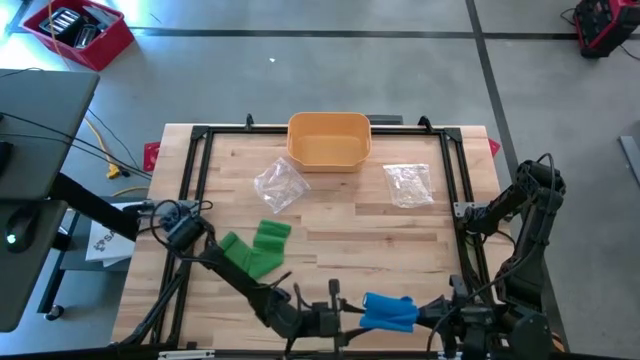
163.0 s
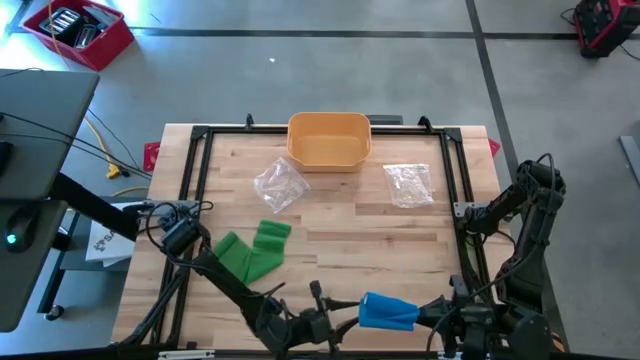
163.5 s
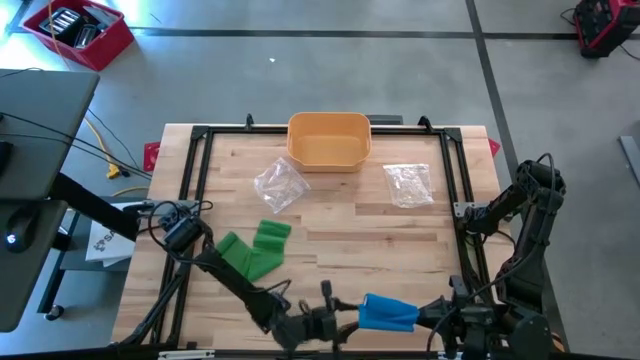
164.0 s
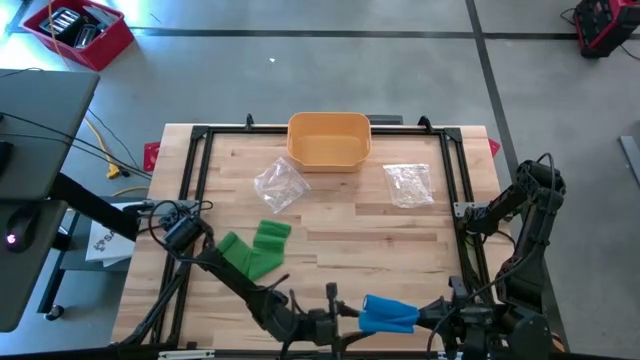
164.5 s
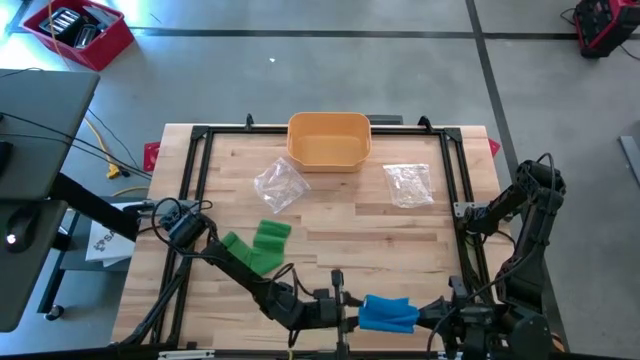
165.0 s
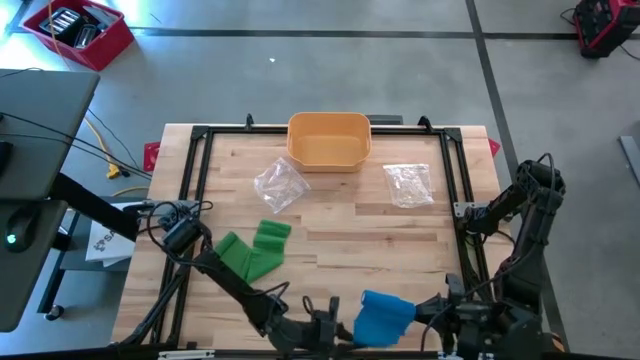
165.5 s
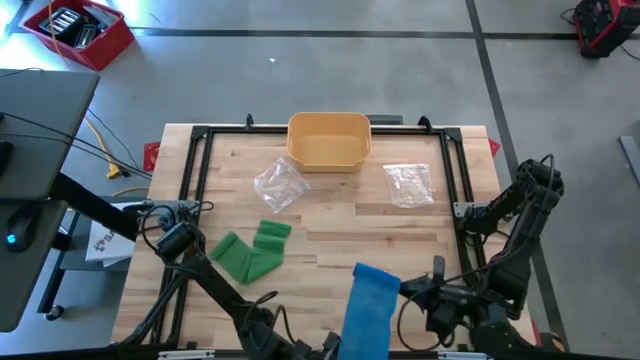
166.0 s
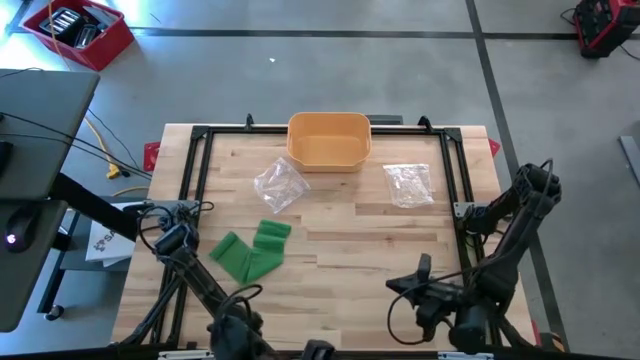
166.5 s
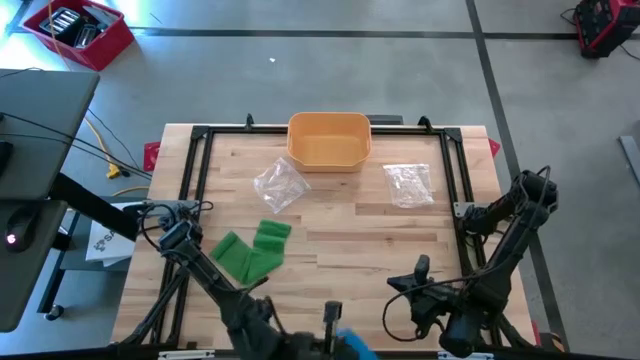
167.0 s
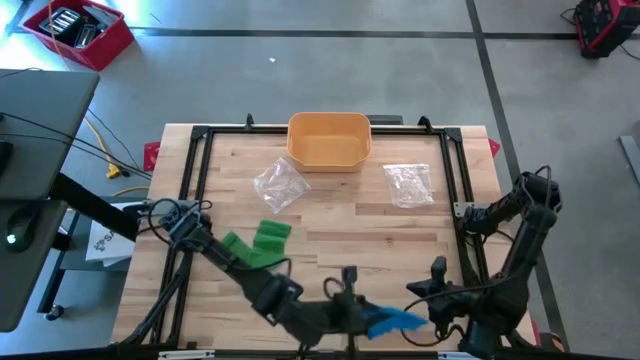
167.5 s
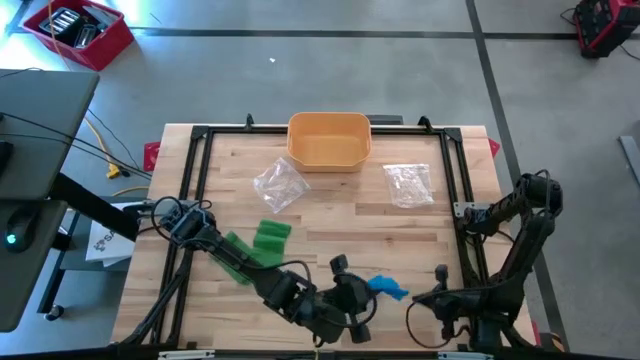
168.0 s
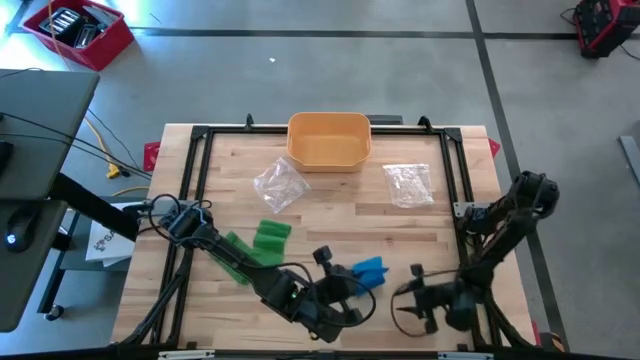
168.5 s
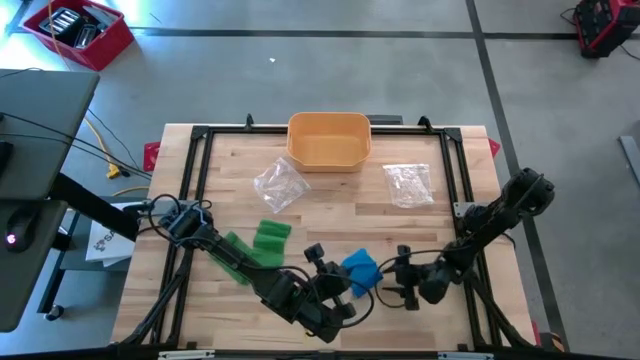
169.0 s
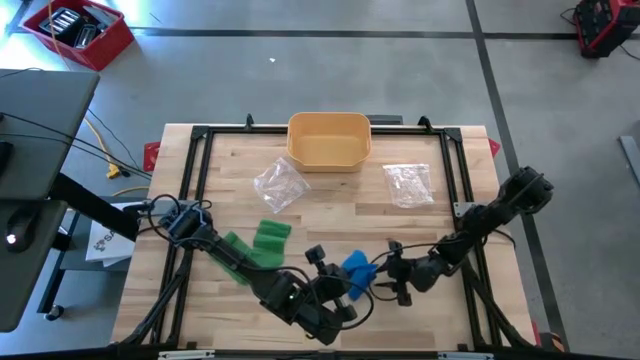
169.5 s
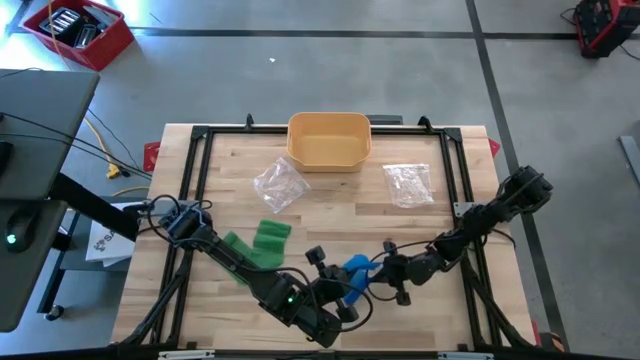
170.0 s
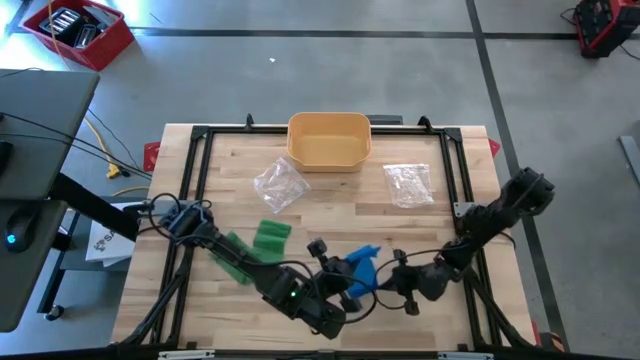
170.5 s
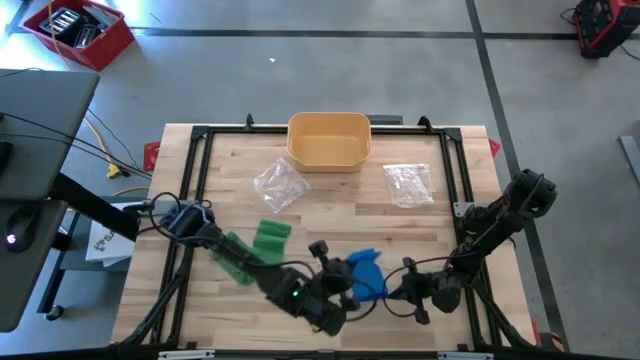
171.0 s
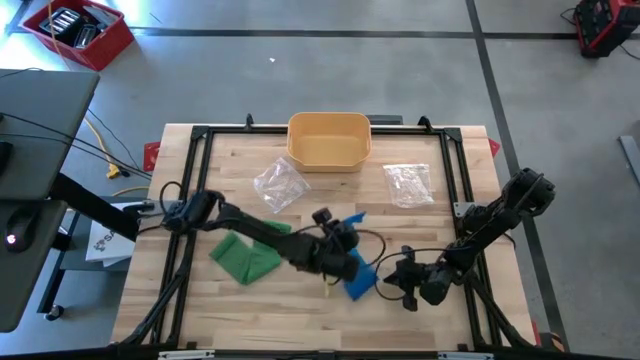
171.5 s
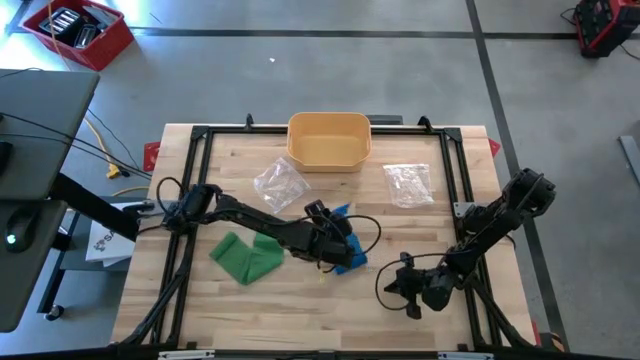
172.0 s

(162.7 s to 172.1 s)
Task: Roll bandage
Roll the blue bandage

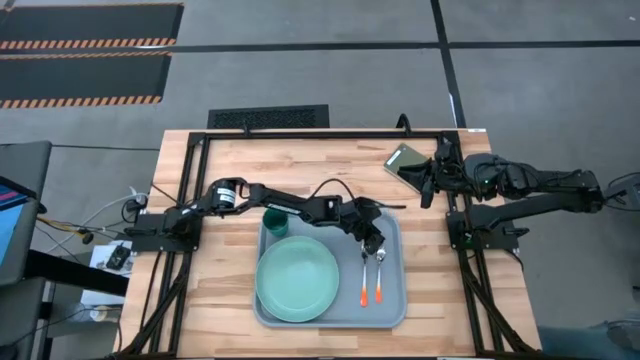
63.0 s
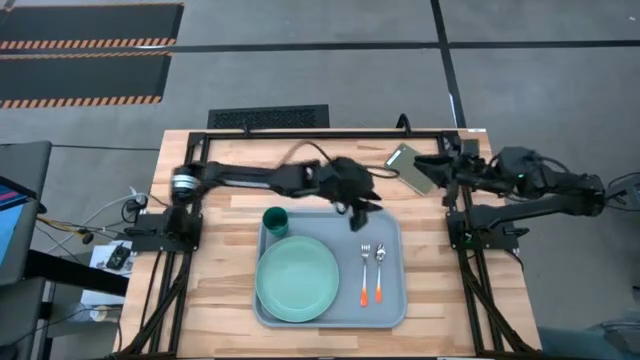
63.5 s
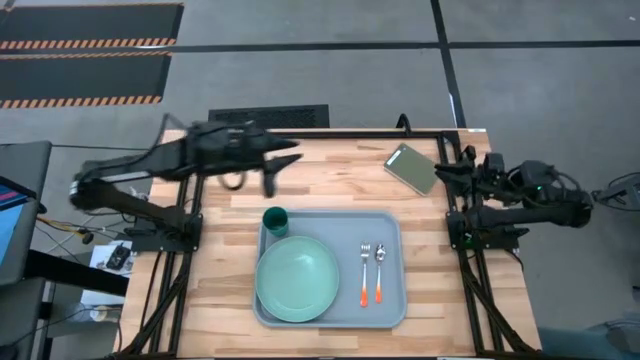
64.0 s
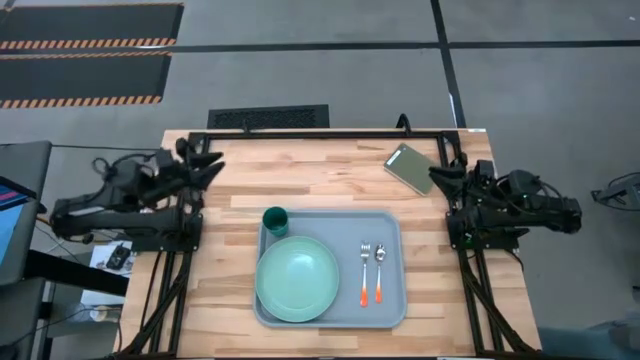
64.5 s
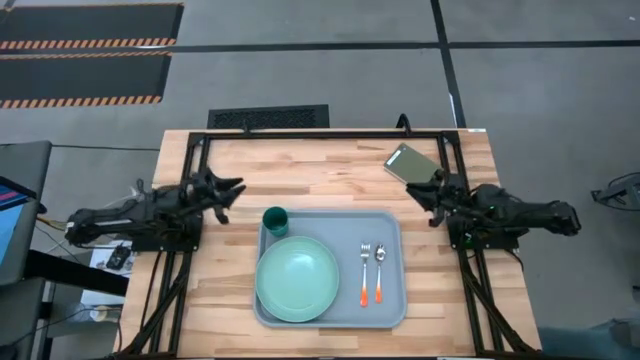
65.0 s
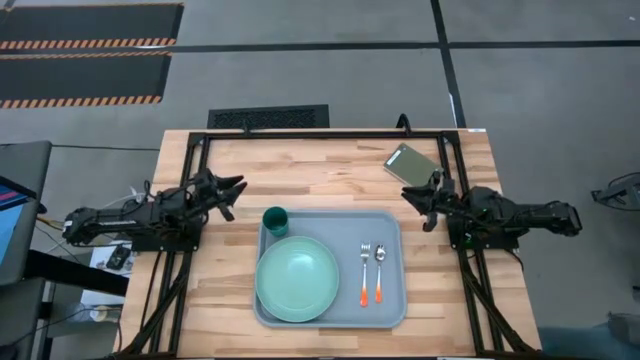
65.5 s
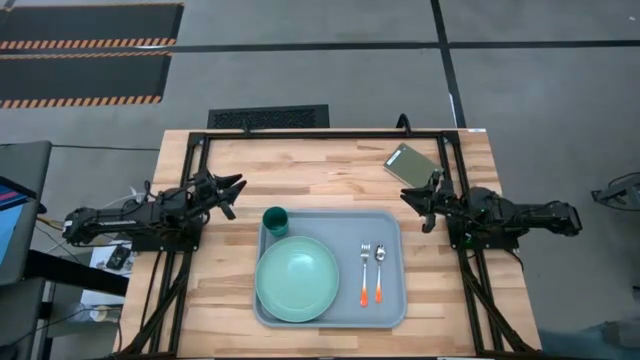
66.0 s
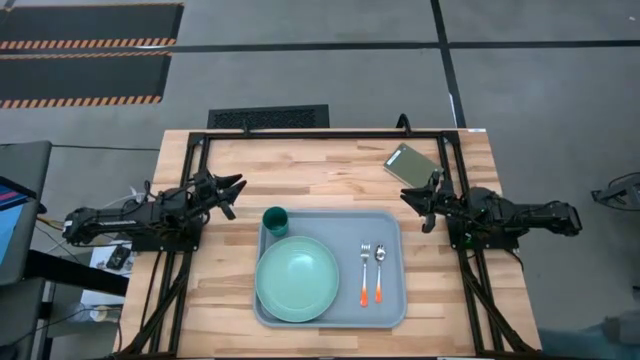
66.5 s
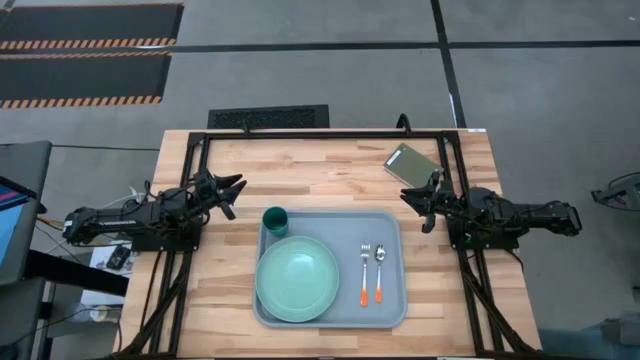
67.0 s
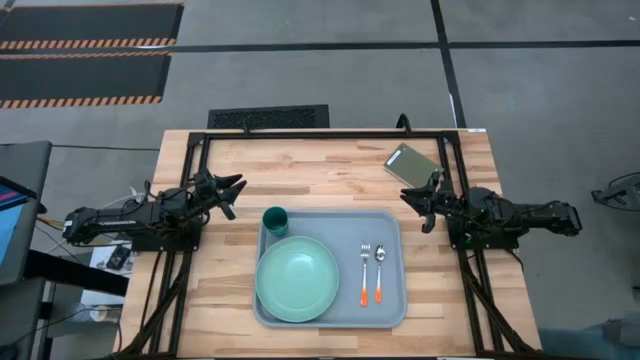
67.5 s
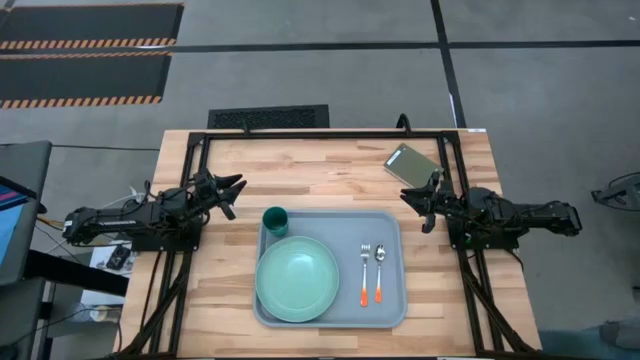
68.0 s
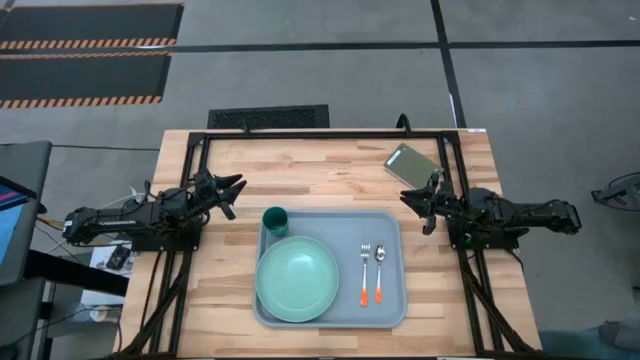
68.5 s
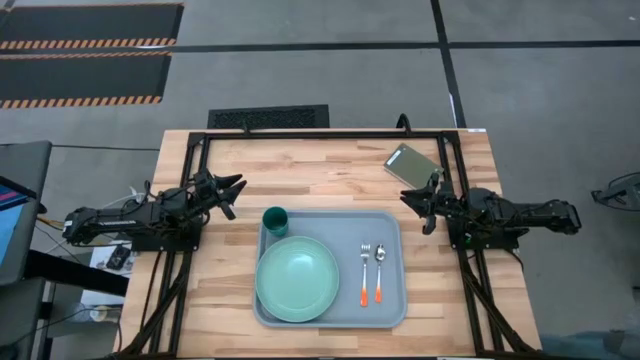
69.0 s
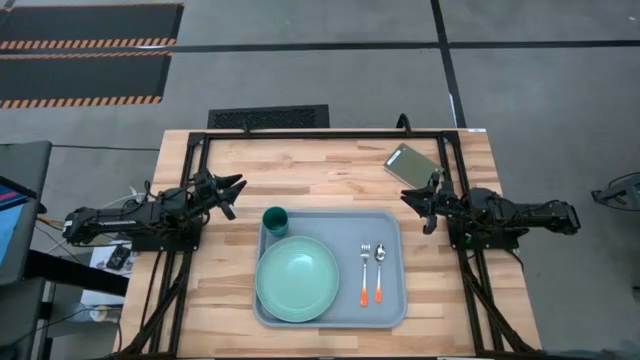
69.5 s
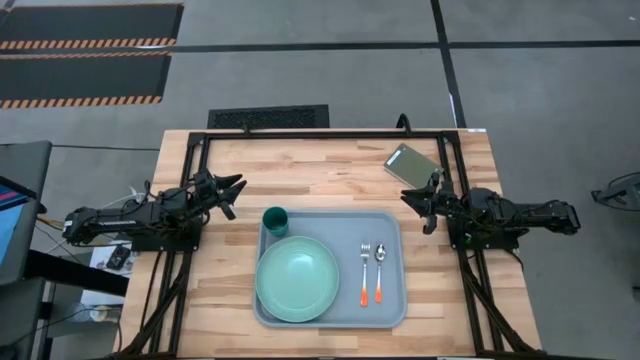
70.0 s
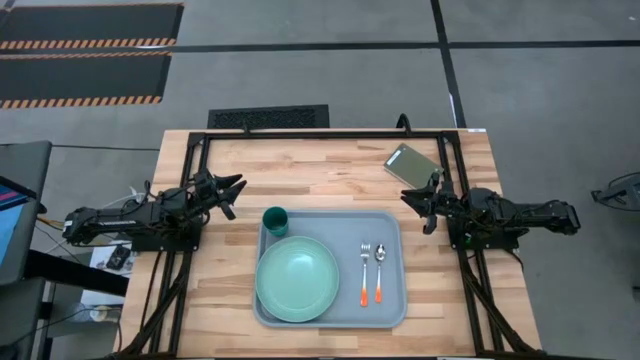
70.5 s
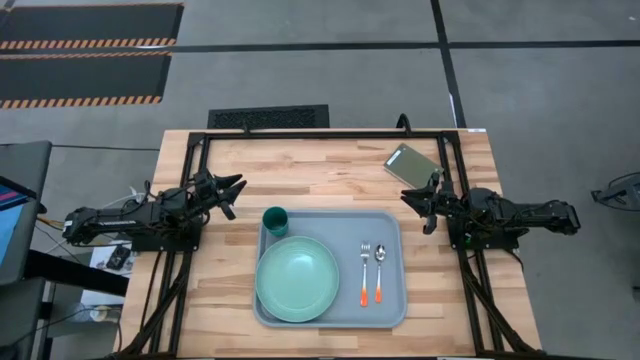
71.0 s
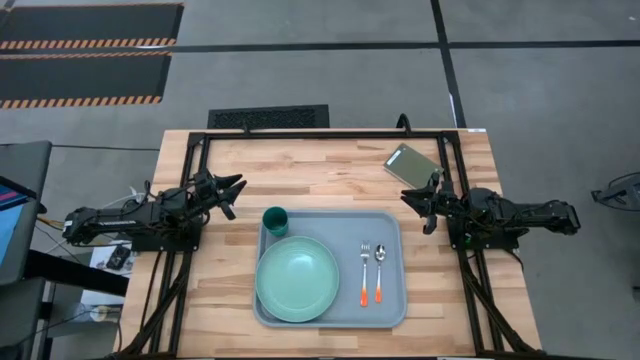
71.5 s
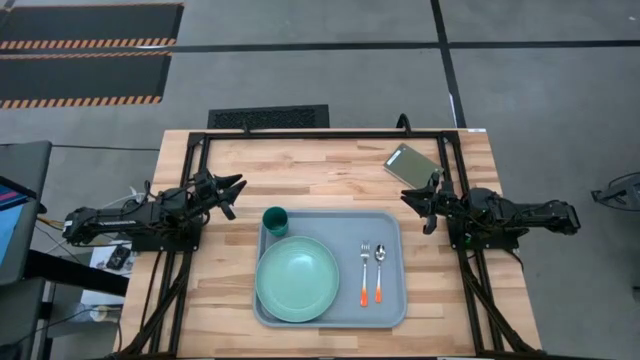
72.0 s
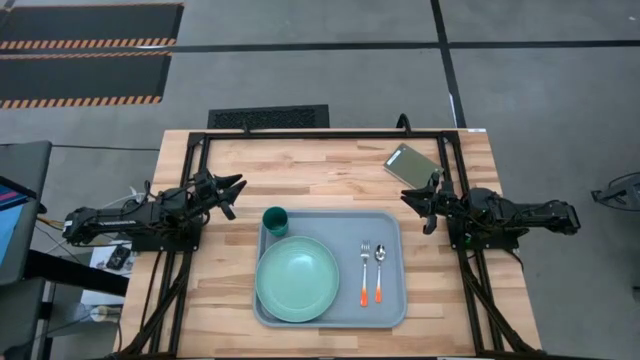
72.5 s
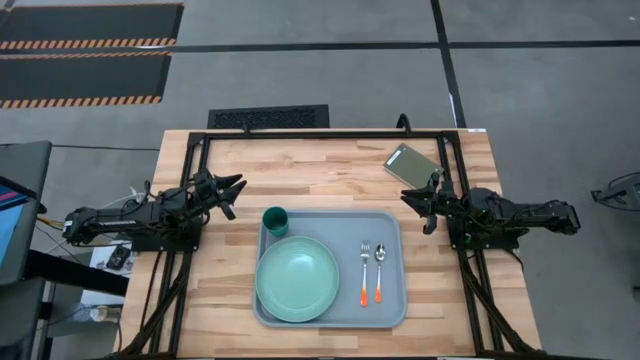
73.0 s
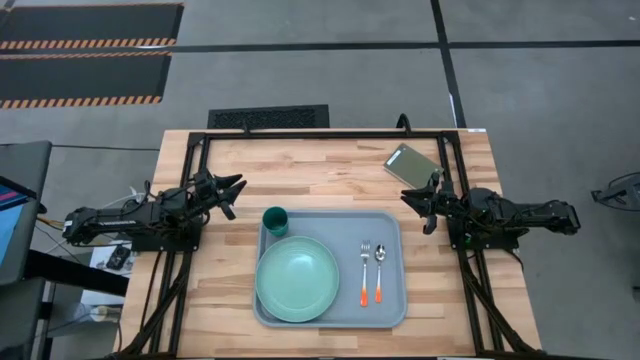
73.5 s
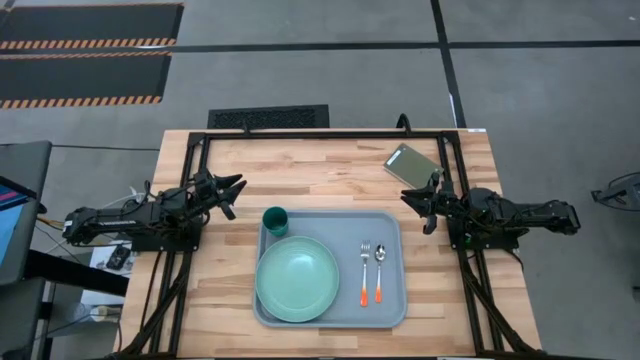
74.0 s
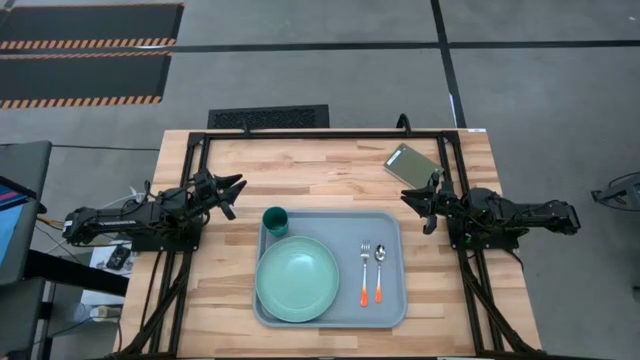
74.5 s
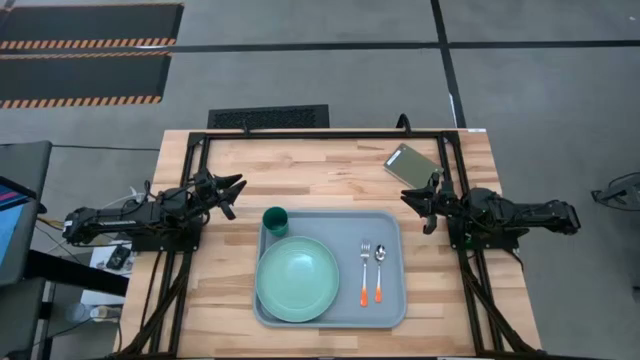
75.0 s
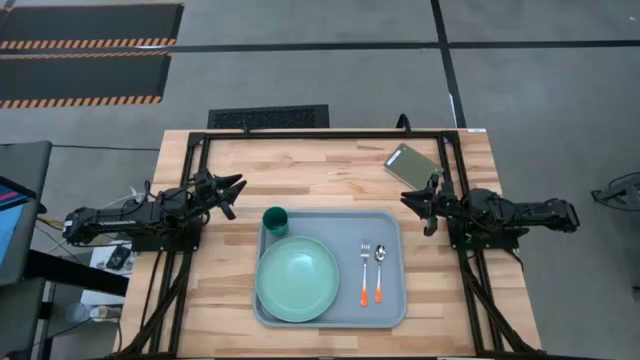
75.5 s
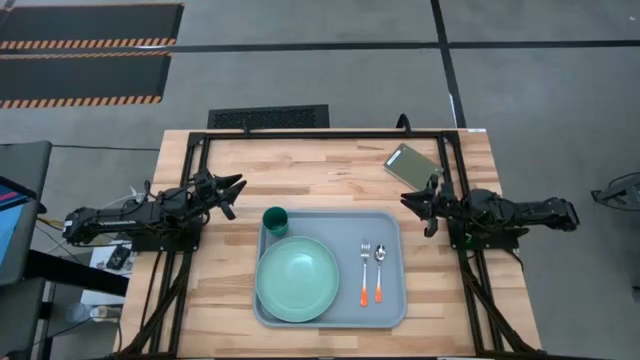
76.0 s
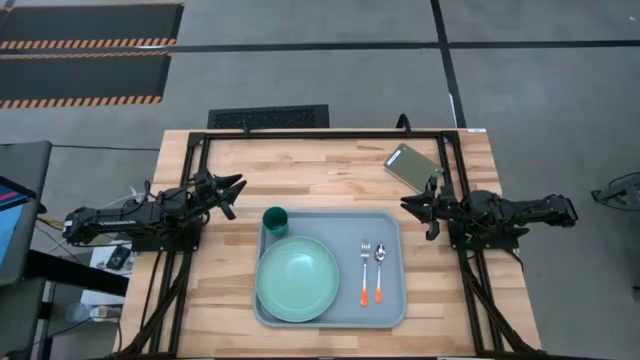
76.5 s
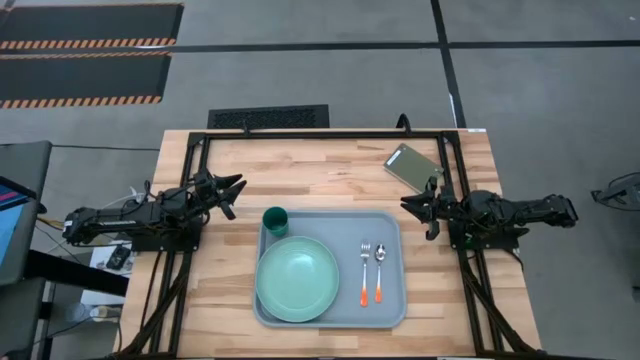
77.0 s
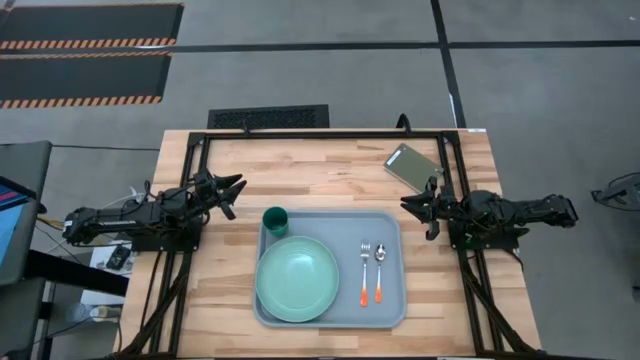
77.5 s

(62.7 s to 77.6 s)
Task: Pick and place plate/cup/fork/spoon on tray
Return to Home Position
